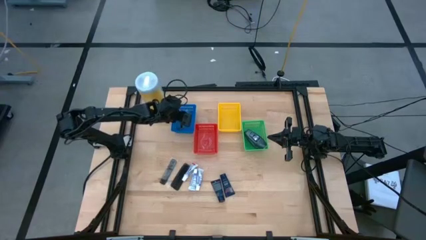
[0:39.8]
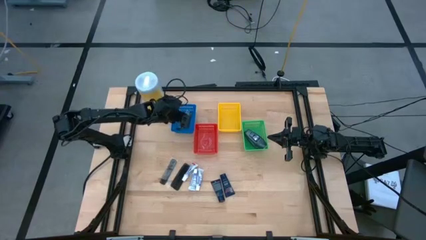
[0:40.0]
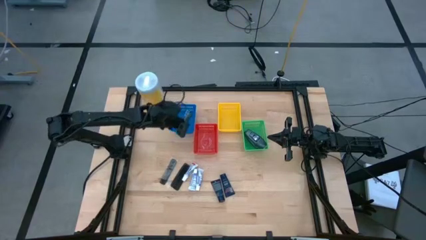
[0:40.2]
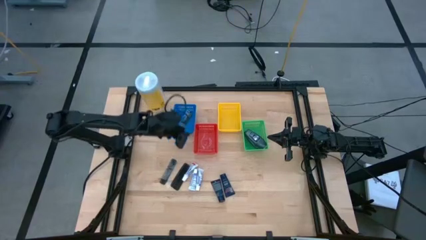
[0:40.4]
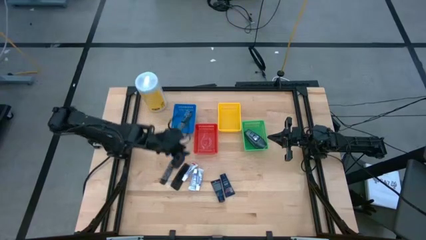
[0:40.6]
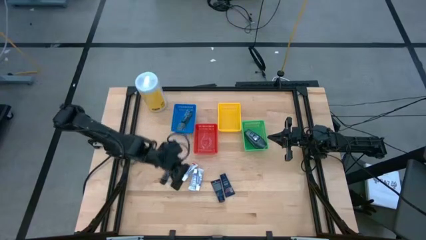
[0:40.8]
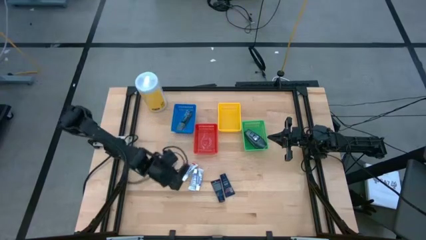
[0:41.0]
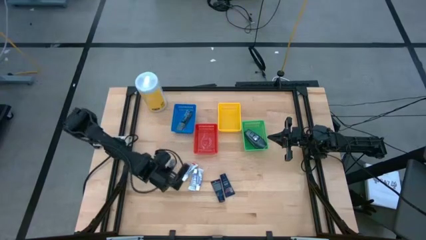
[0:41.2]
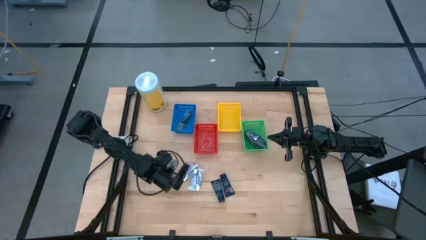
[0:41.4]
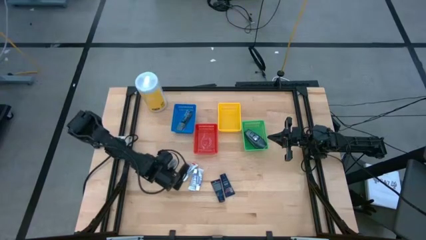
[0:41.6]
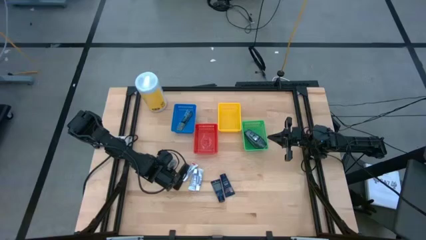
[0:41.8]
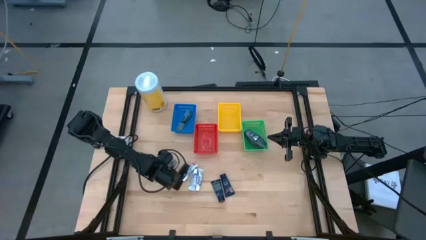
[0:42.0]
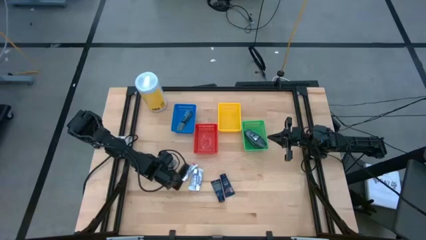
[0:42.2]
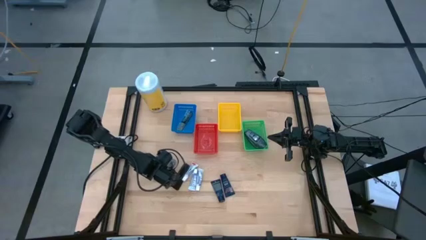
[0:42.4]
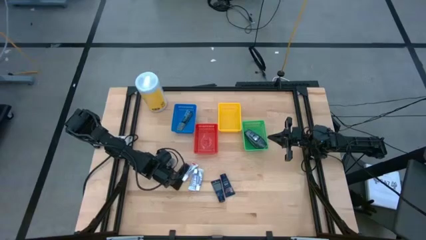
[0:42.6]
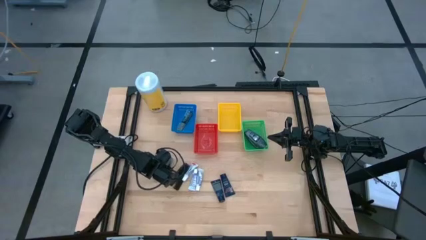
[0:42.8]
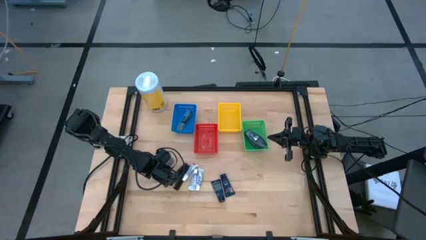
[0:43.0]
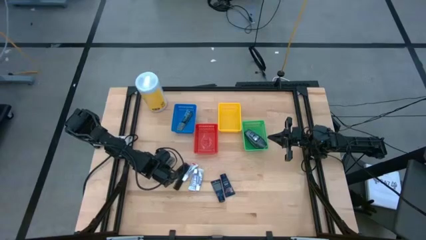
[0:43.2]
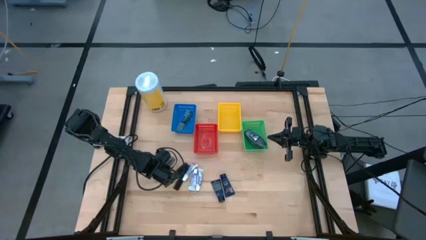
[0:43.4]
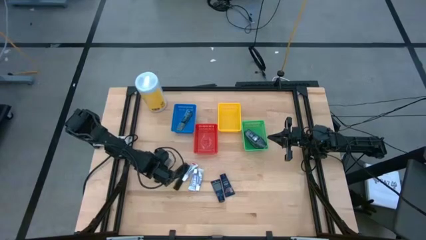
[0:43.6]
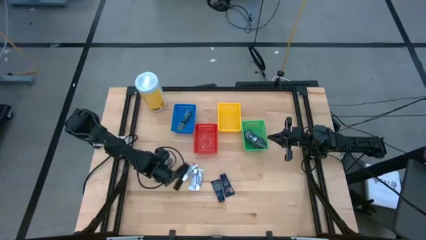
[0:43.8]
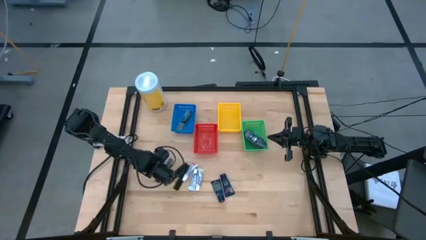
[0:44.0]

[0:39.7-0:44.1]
Task: Pick & Place Travel size toiletries
Put the black comb into the blue bin

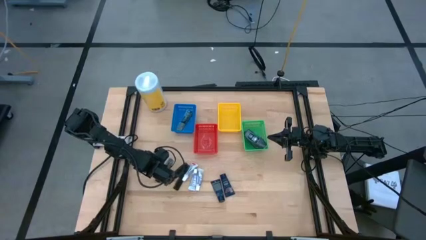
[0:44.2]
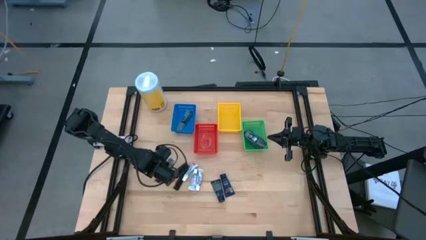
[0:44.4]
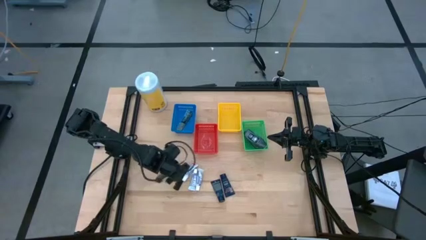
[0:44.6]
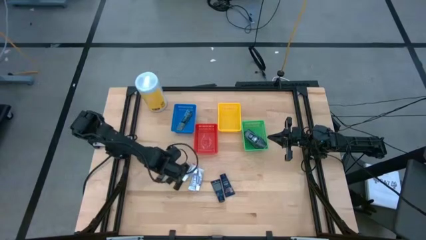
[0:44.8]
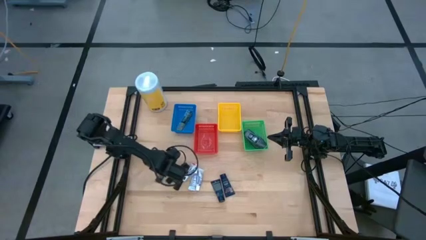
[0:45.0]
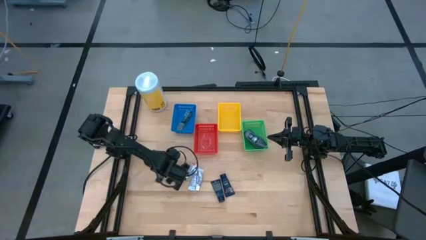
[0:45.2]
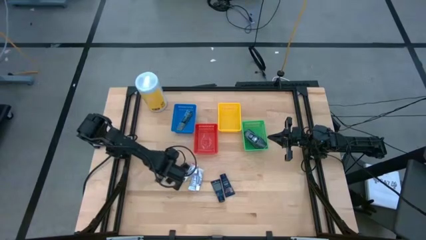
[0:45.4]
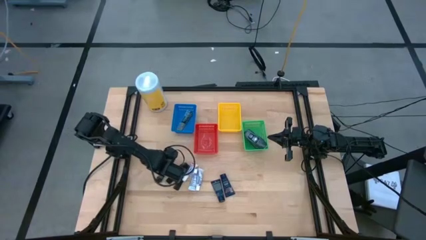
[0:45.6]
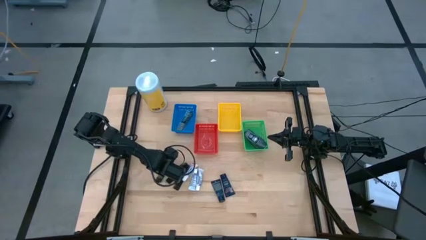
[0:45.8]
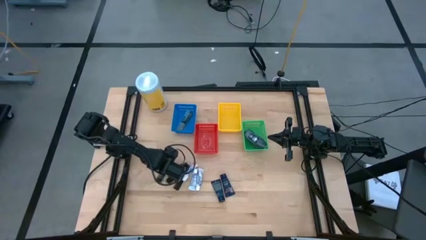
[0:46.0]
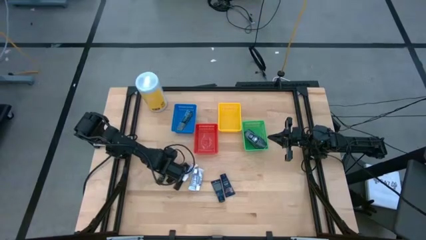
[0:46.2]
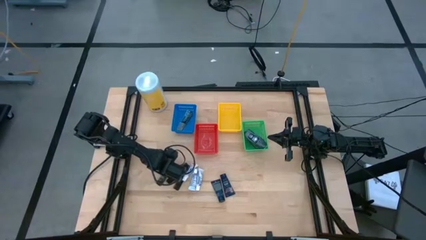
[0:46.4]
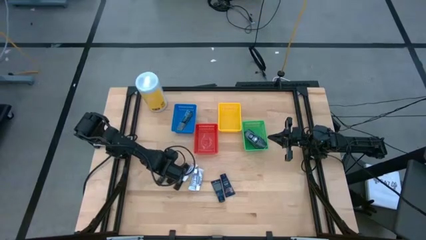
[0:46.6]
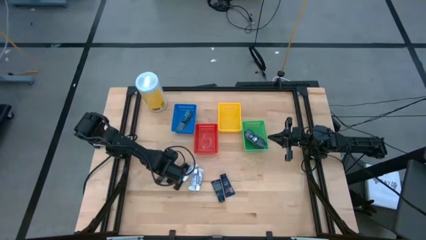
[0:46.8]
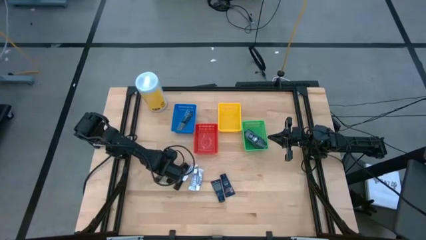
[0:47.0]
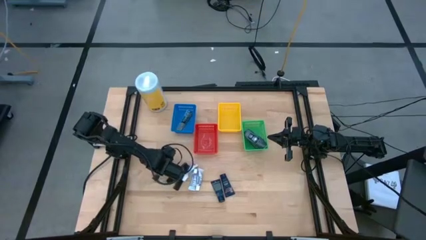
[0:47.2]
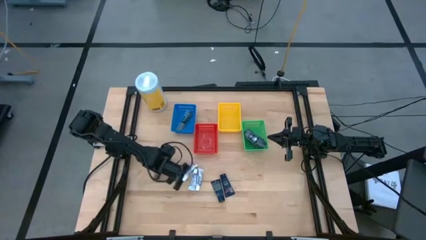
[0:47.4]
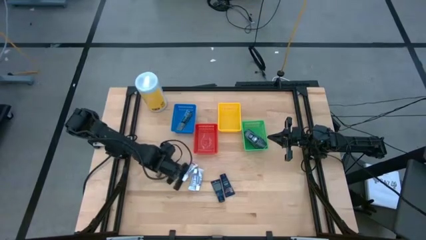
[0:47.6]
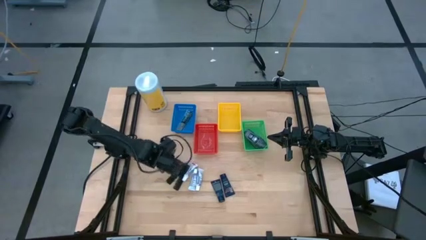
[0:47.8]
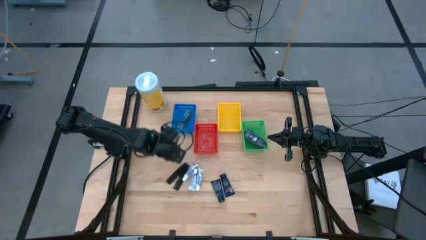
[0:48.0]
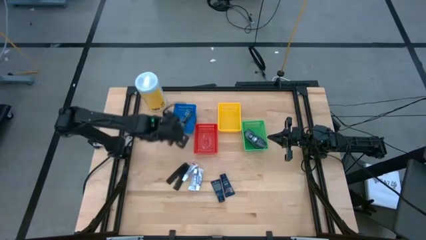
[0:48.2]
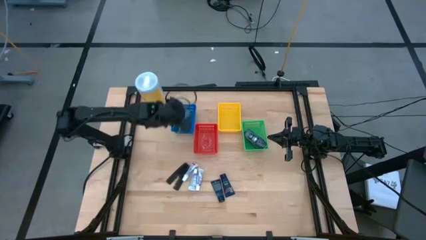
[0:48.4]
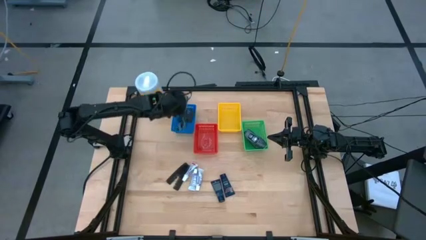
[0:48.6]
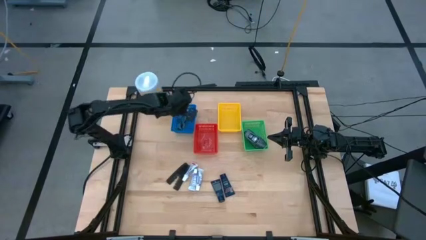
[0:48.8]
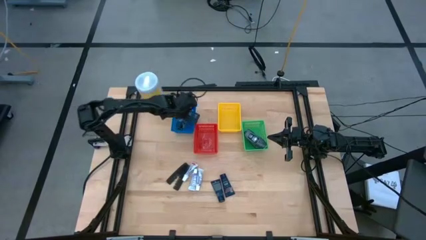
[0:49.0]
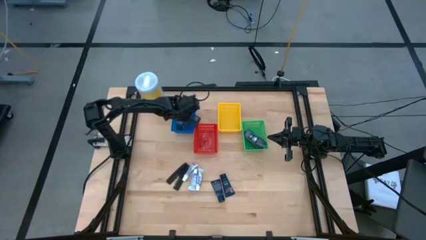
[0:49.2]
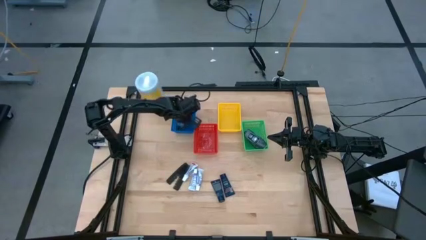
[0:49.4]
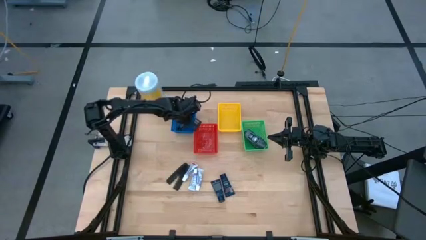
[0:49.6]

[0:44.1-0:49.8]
Put the black bomb into the blue bin

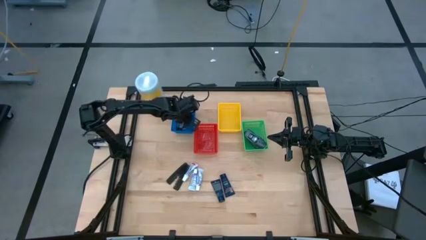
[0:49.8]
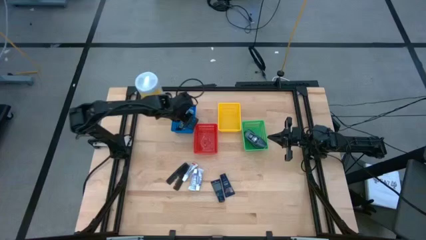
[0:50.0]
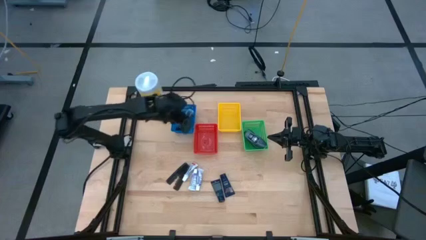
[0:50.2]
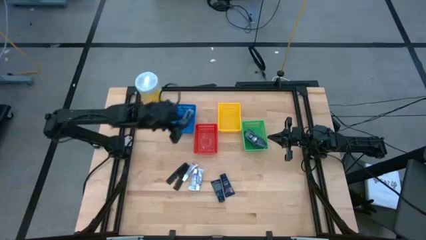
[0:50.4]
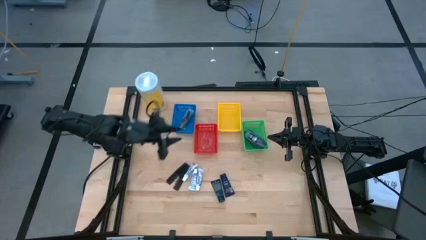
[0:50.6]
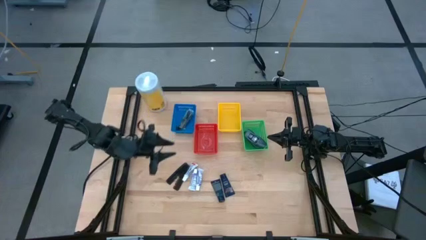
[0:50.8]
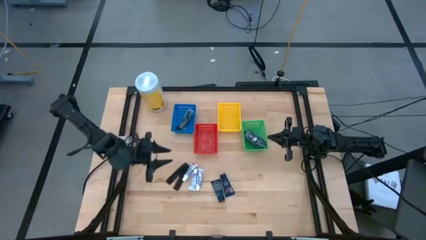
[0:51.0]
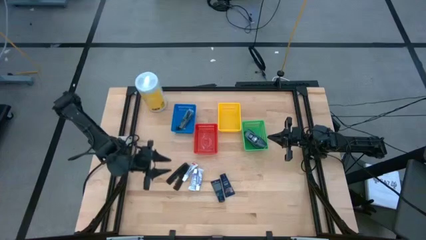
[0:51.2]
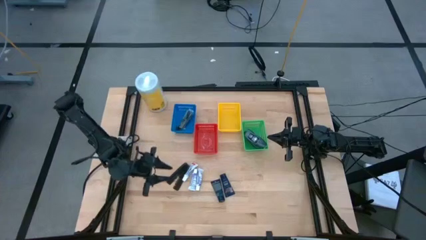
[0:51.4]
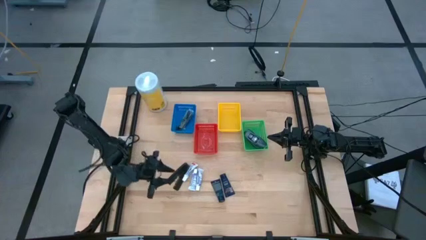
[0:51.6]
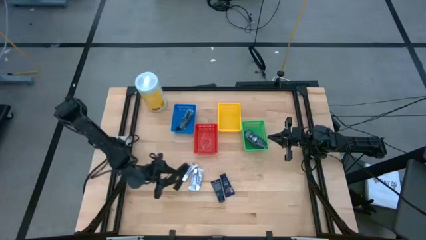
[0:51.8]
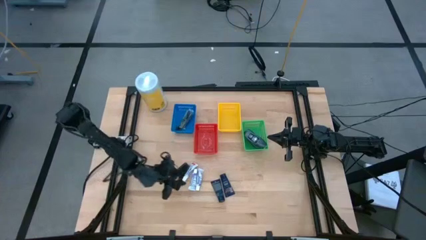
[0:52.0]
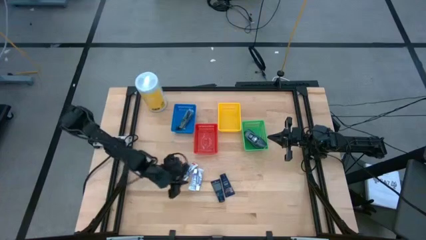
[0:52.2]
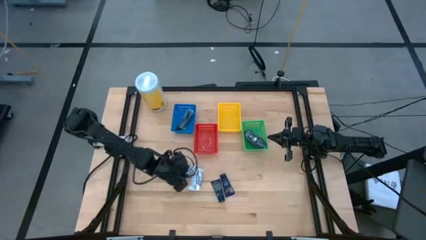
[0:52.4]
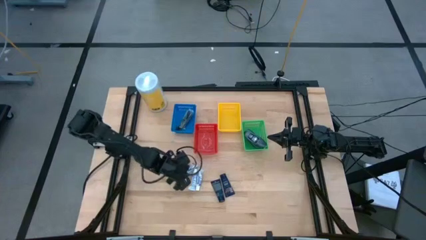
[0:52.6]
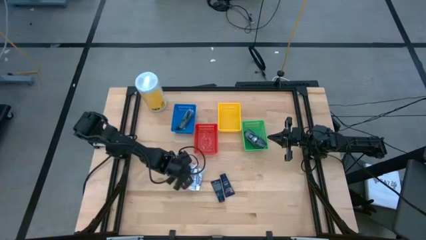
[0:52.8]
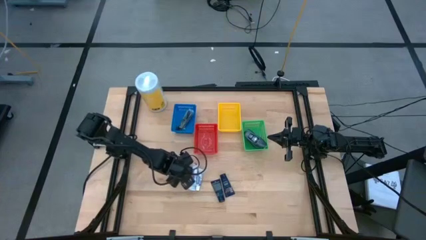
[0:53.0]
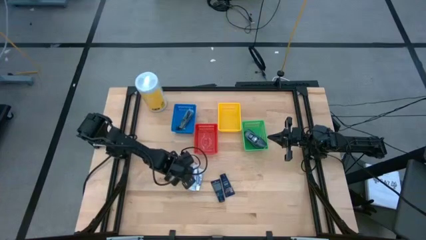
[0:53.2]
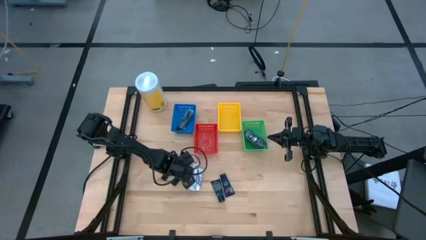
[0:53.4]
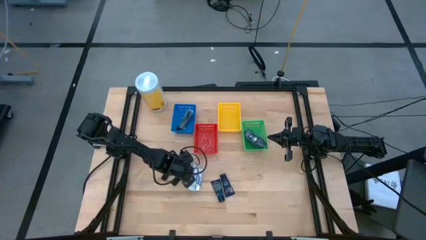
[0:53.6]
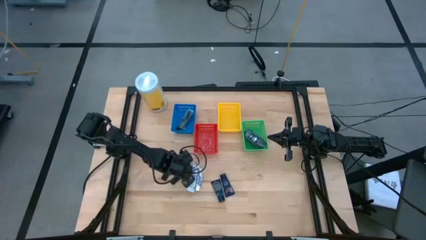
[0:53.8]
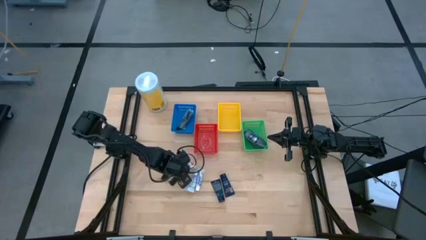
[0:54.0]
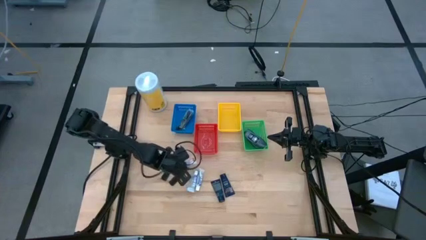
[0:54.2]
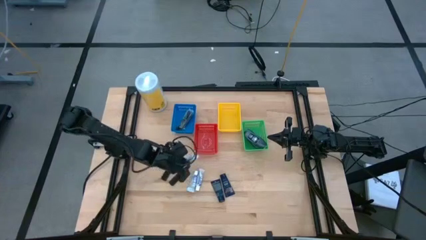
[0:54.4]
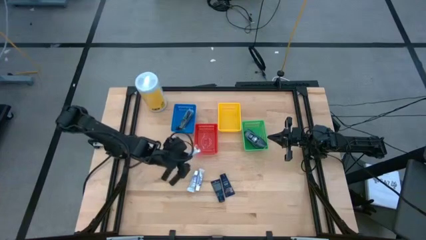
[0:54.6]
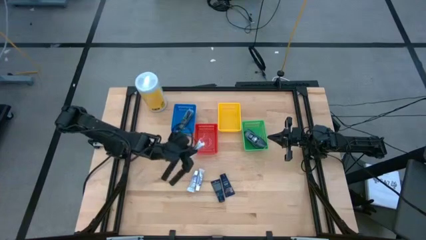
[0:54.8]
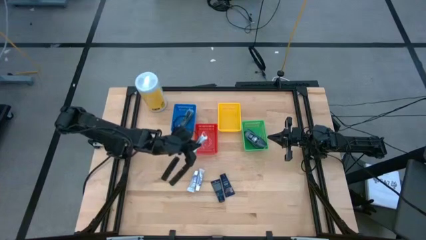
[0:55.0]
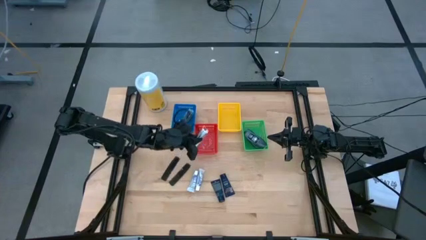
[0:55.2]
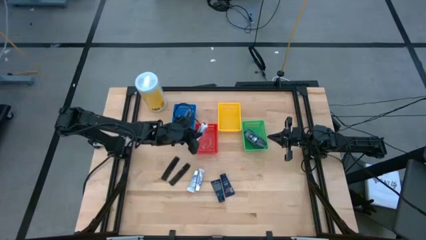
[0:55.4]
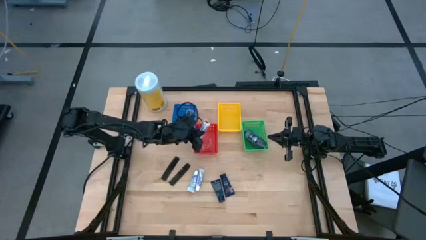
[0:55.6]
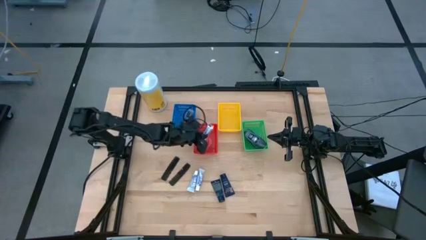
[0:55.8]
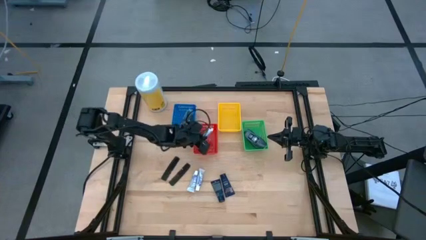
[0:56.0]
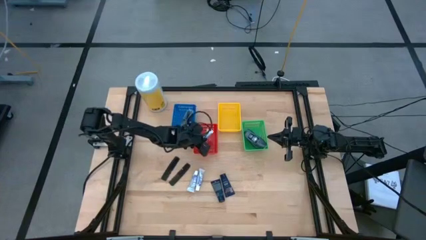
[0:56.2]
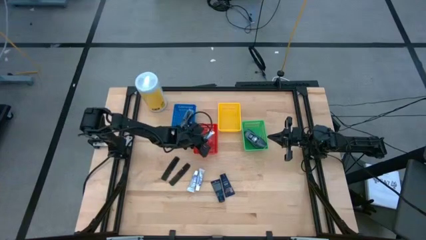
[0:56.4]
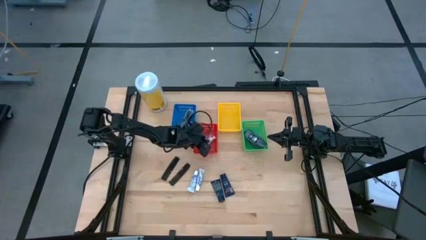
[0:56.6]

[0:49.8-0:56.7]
Put the white toothpaste into the red bin
